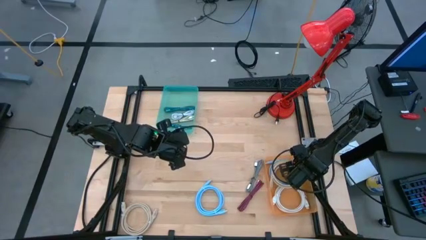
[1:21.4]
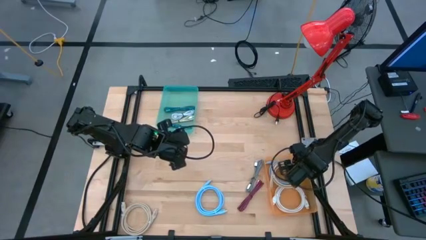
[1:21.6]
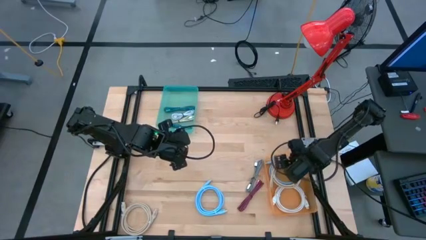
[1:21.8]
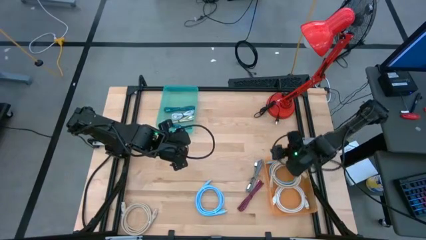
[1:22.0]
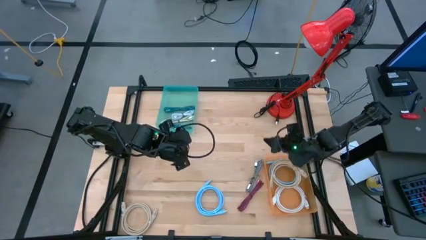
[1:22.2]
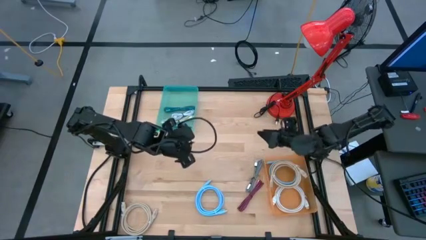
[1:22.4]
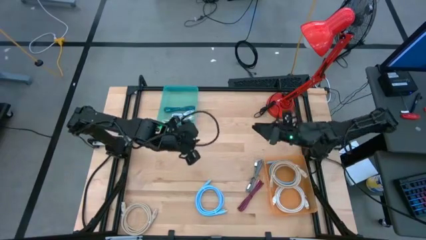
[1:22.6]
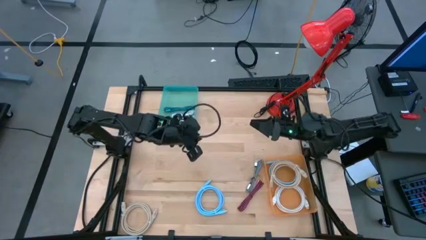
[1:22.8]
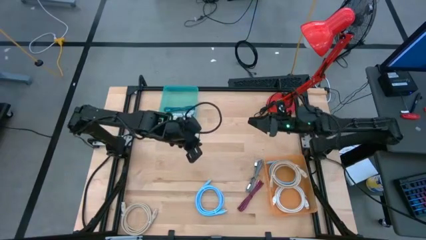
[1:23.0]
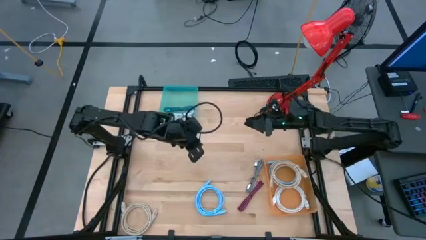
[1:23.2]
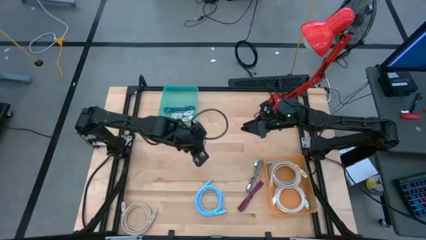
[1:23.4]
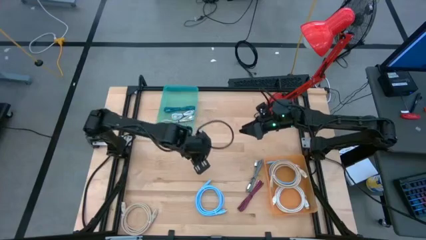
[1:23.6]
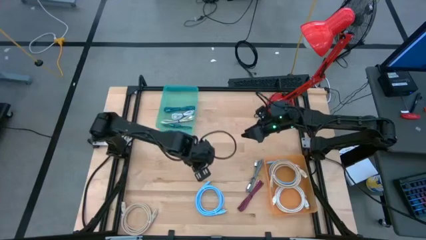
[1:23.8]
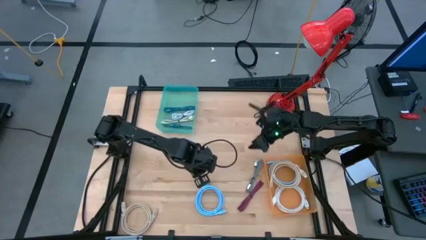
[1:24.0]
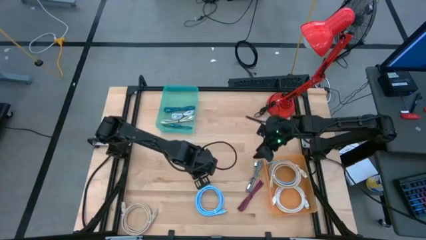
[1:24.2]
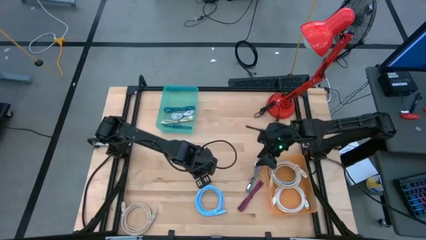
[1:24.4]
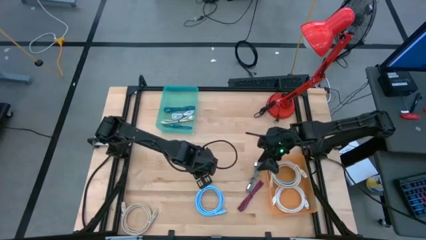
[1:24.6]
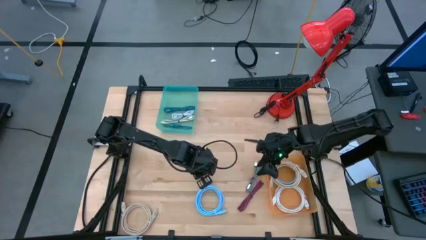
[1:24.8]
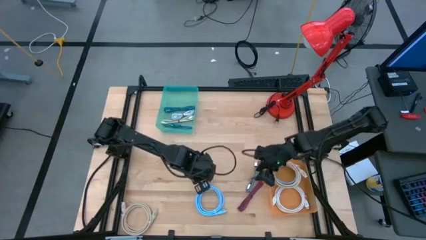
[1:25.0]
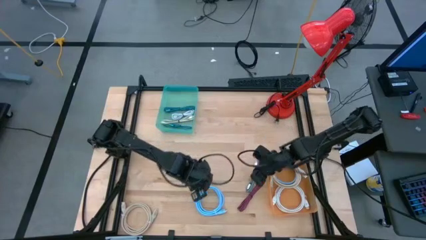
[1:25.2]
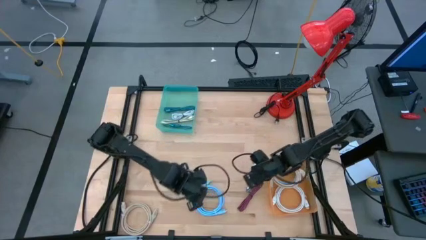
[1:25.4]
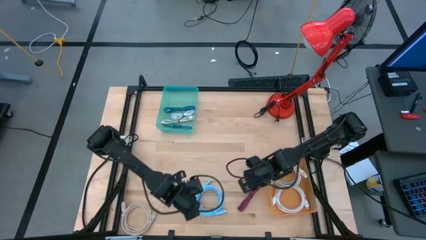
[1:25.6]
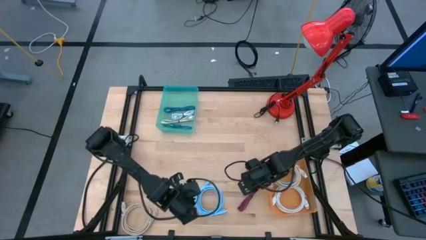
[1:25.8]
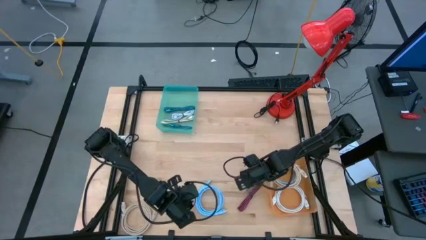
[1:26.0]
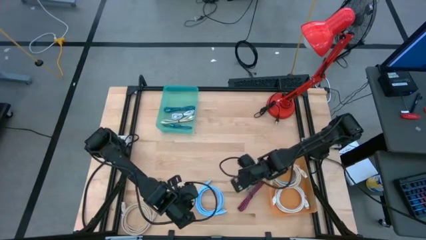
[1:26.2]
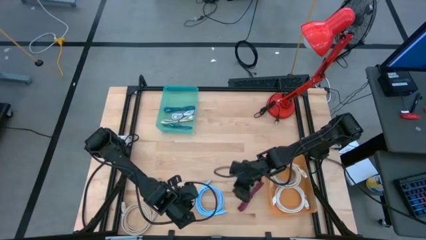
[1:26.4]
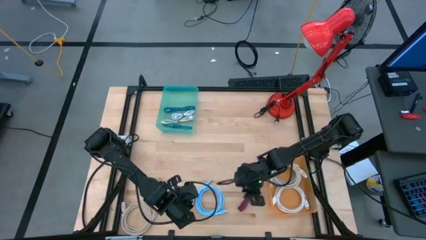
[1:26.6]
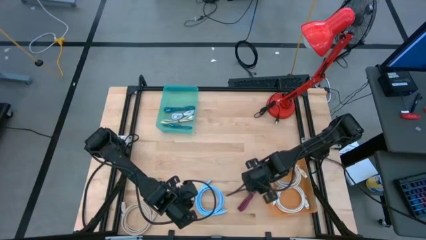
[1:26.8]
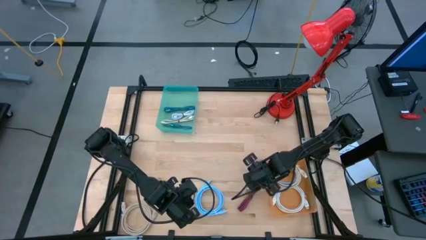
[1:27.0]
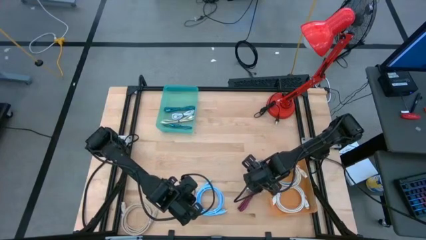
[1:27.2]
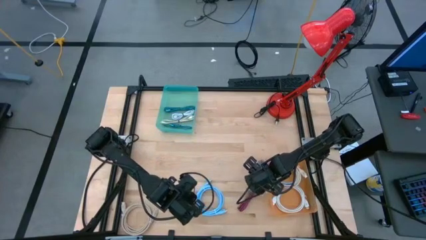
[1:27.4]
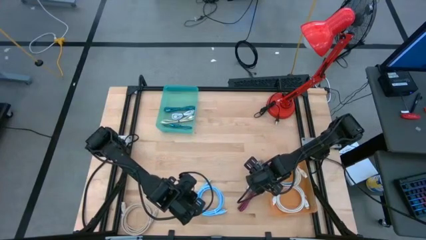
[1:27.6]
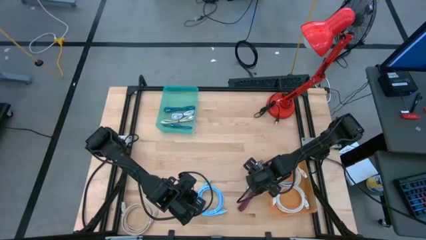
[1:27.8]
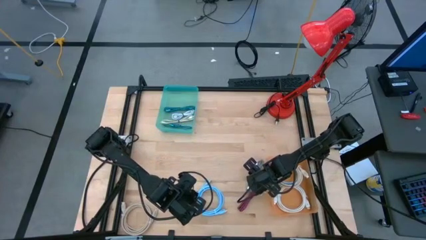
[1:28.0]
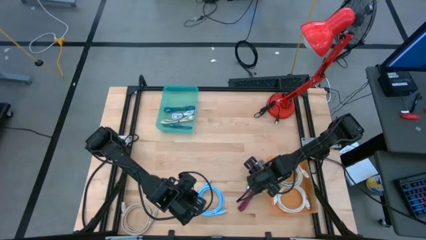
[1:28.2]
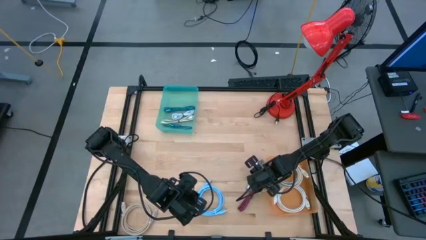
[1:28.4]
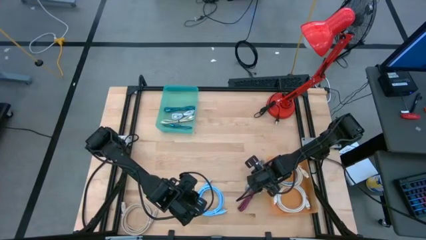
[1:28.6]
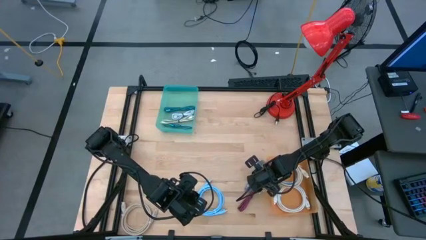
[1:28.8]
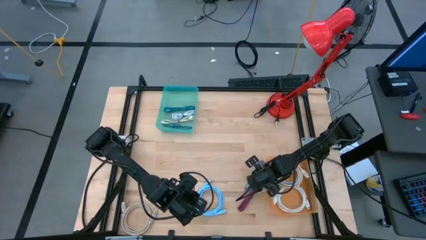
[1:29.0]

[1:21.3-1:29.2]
Task: Pick & Place USB Port
Put the white USB cable into the blue bin

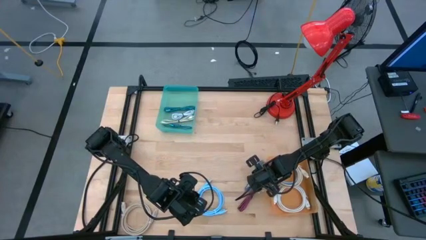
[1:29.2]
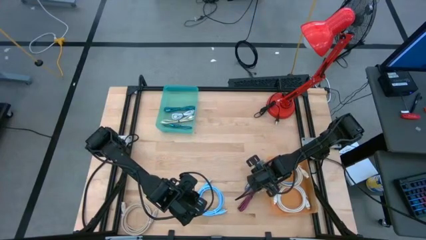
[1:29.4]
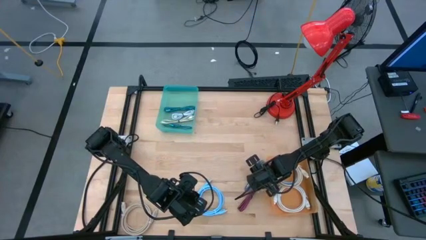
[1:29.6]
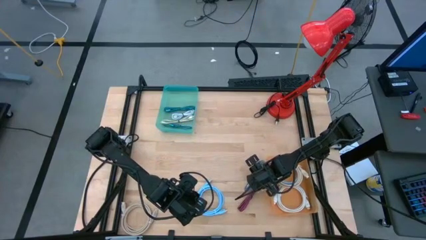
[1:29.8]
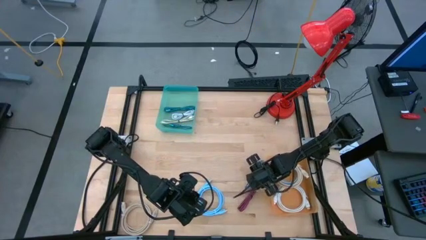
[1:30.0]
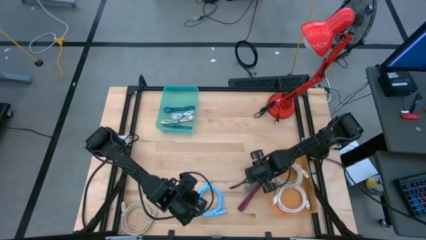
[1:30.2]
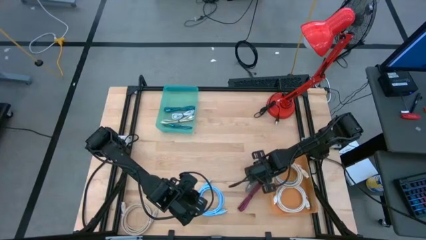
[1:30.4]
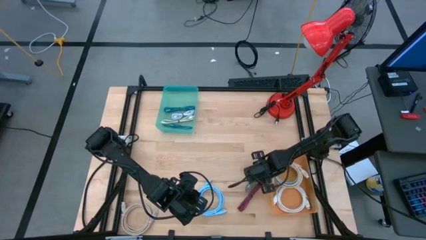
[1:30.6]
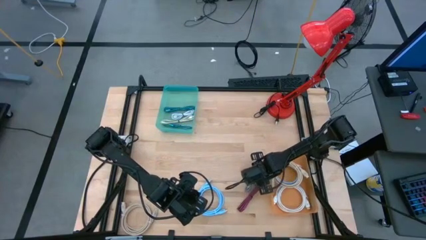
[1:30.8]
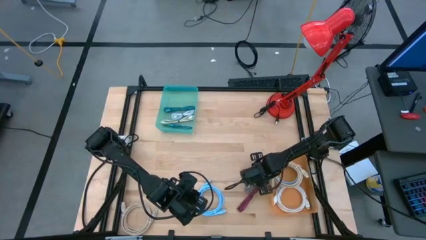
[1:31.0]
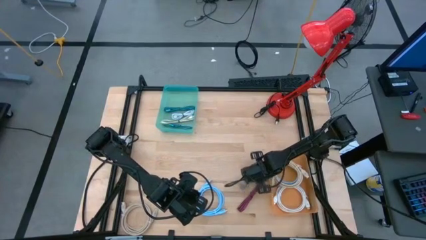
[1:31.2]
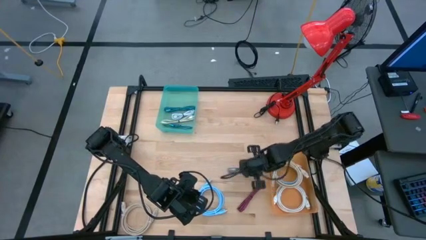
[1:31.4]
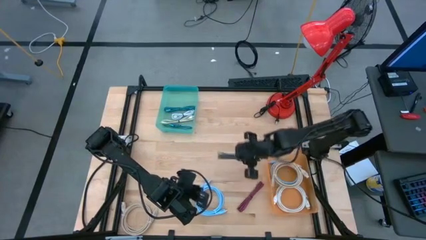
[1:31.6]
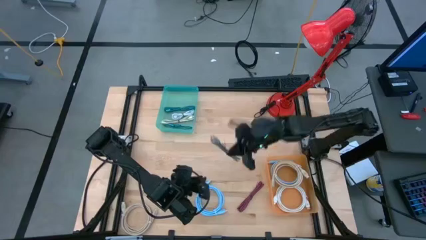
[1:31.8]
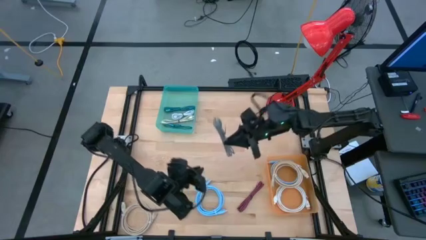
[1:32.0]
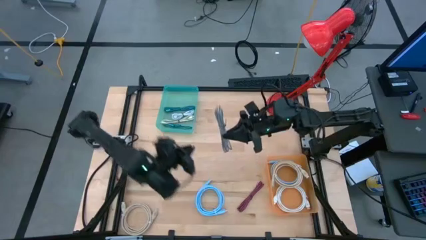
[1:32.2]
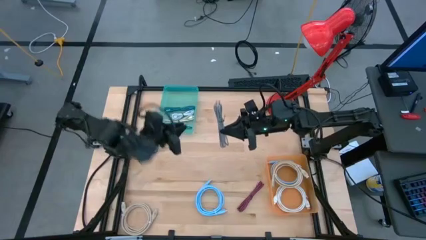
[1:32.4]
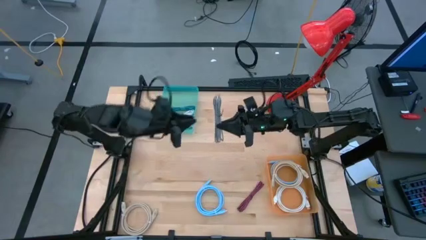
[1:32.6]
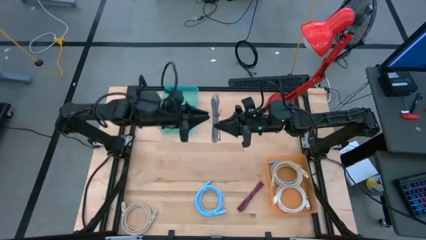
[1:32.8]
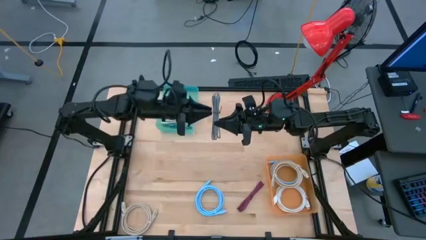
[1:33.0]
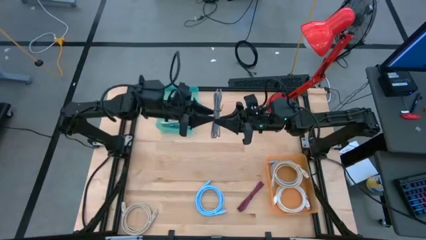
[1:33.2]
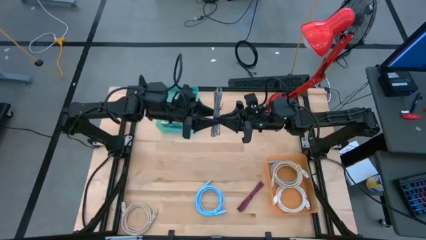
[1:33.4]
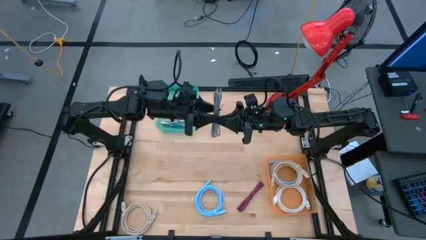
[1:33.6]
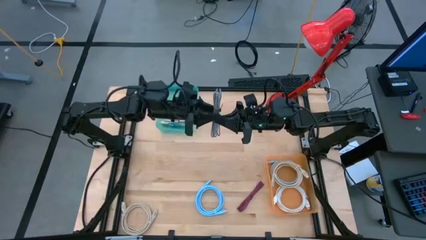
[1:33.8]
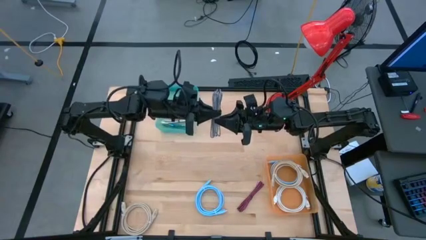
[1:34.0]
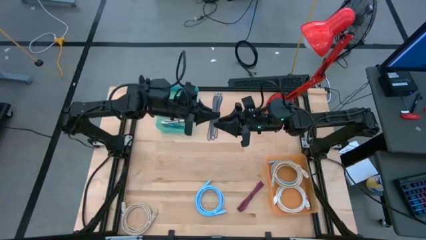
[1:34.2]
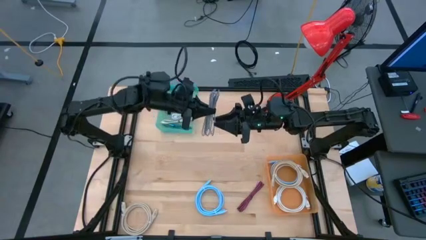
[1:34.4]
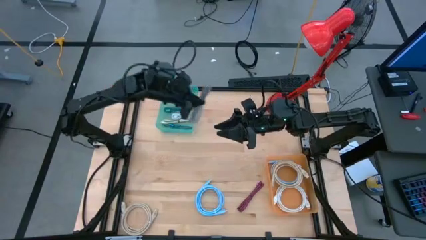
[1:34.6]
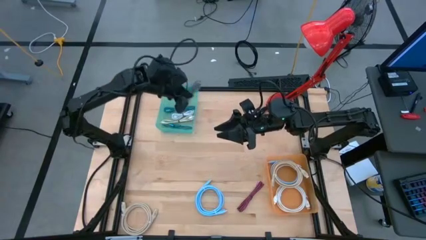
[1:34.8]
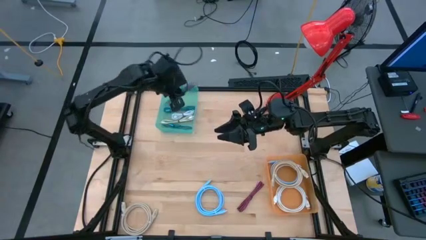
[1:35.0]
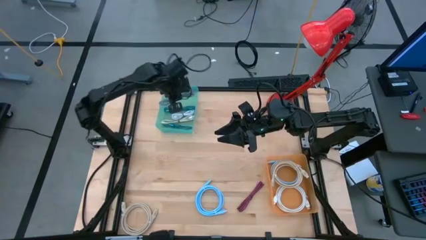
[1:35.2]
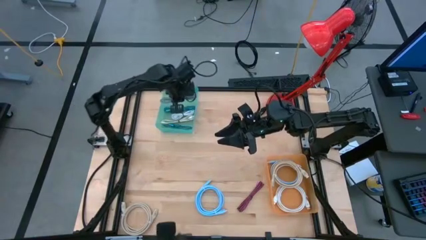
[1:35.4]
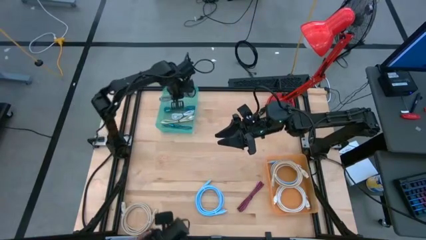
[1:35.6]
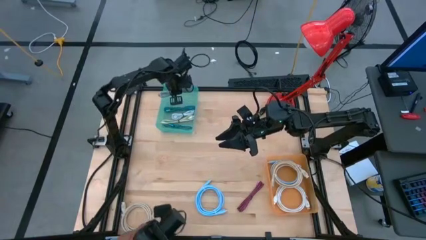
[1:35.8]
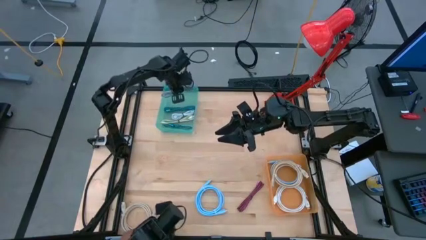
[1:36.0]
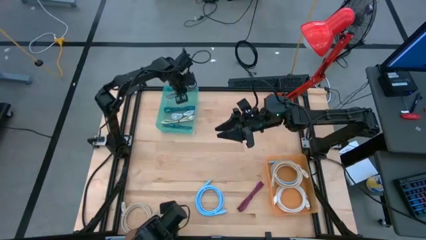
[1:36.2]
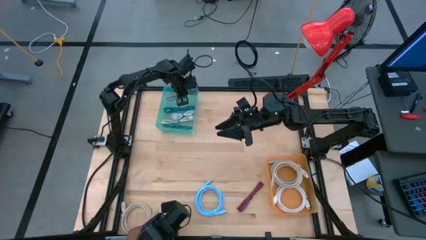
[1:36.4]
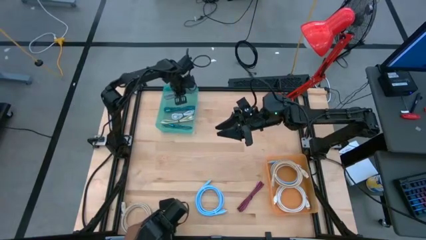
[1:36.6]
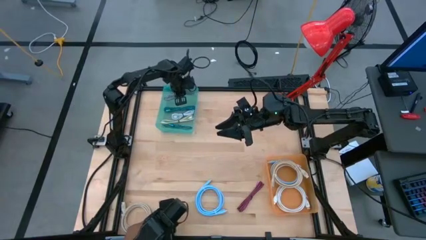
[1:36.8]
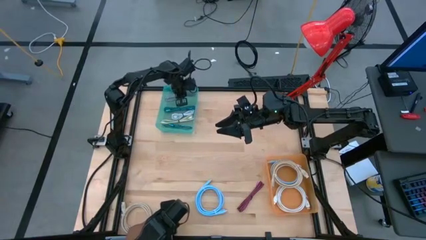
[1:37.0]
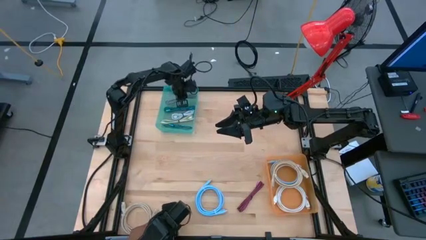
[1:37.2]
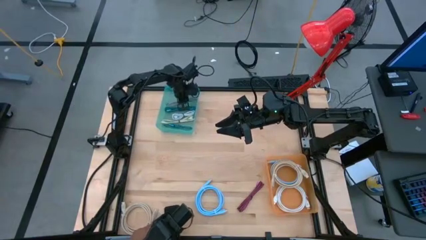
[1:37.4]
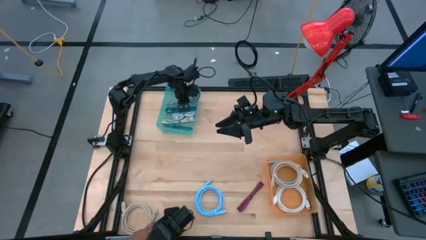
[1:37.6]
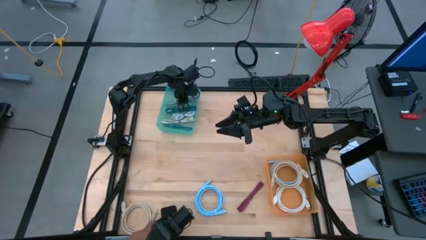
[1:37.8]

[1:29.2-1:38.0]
Put the white USB cable into the blue bin

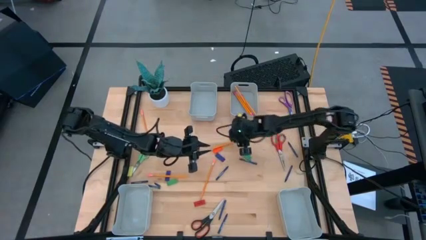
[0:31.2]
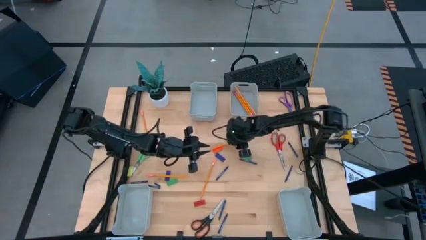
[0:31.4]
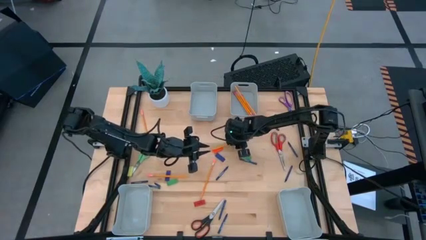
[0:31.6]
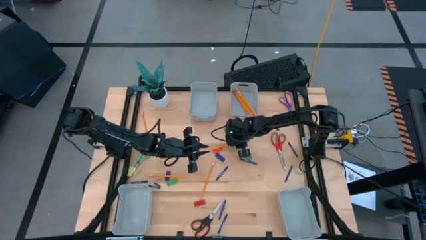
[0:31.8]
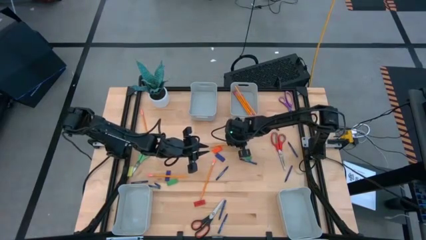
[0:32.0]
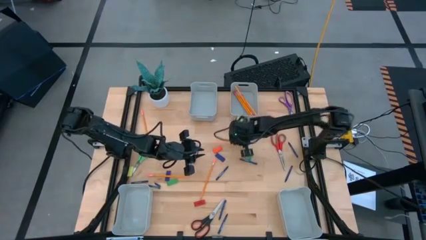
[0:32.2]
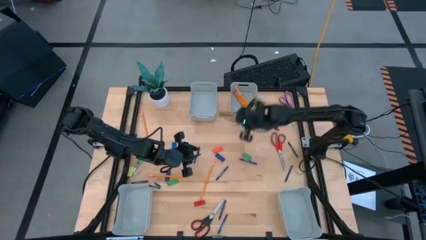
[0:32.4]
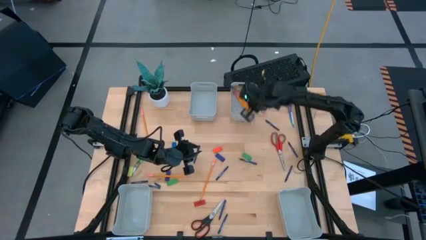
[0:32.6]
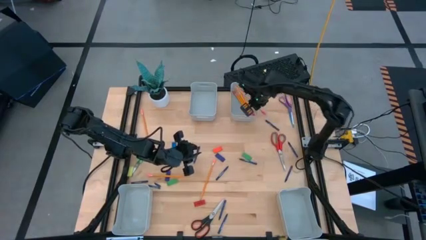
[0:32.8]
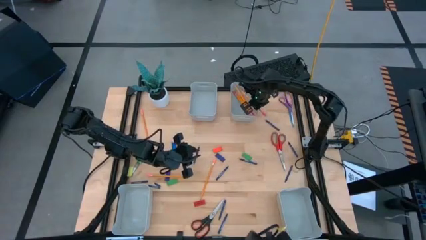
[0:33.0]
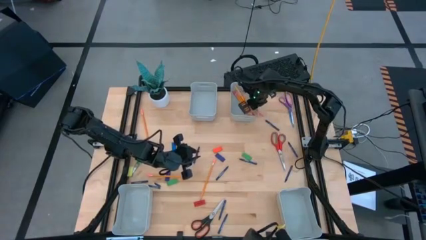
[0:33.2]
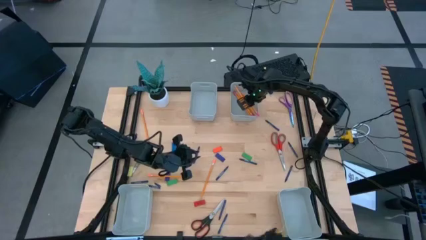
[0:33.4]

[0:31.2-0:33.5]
Task: Sort crayons/erasers/pens/pencils in bins
Put the yellow pencil into the top right bin
